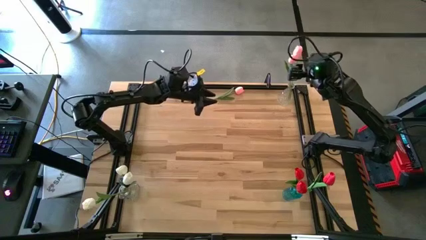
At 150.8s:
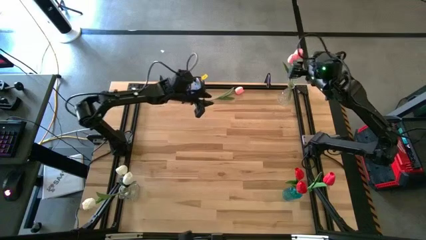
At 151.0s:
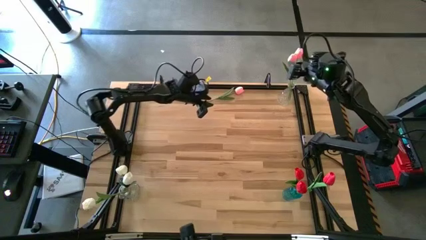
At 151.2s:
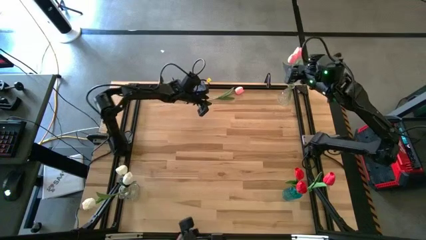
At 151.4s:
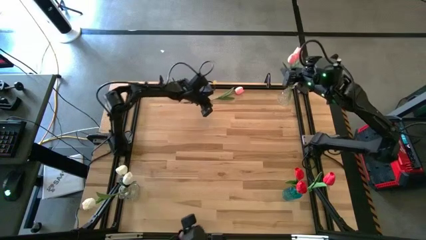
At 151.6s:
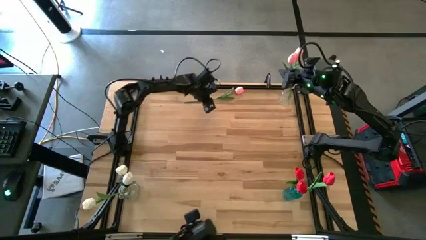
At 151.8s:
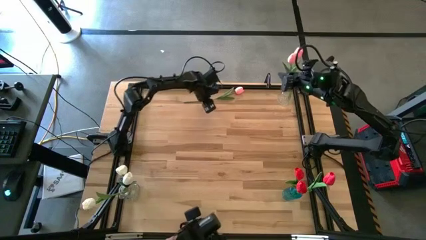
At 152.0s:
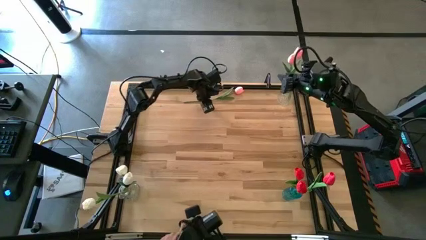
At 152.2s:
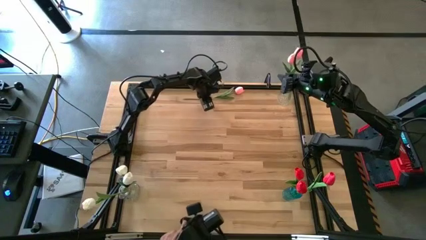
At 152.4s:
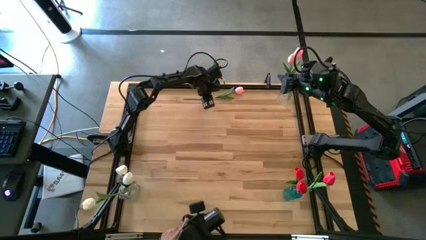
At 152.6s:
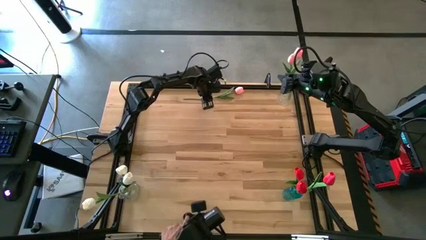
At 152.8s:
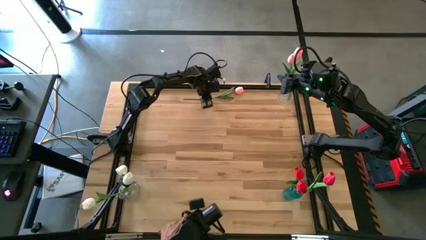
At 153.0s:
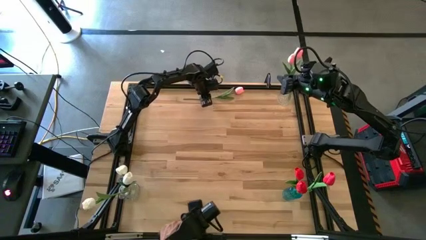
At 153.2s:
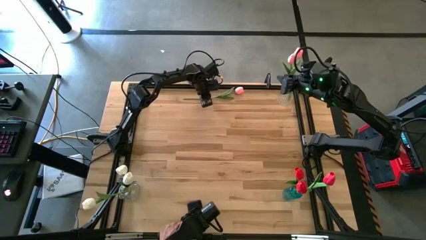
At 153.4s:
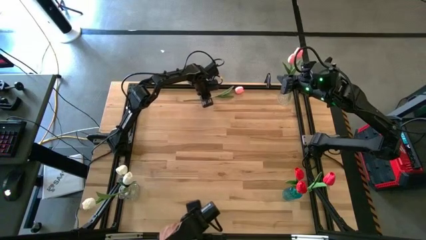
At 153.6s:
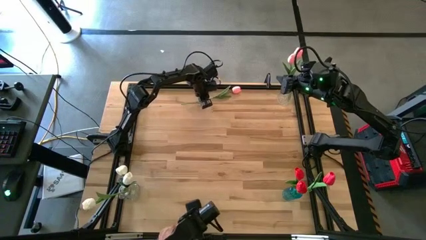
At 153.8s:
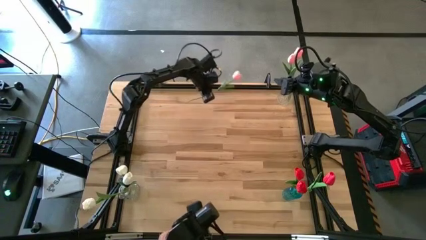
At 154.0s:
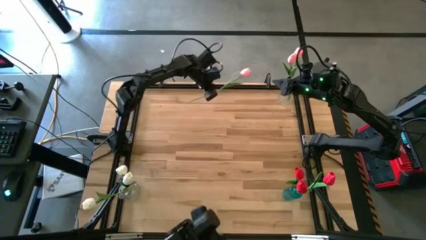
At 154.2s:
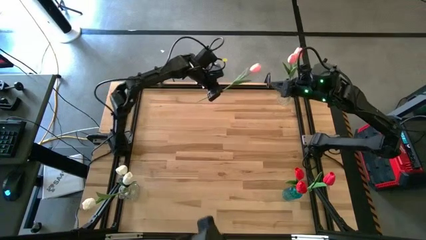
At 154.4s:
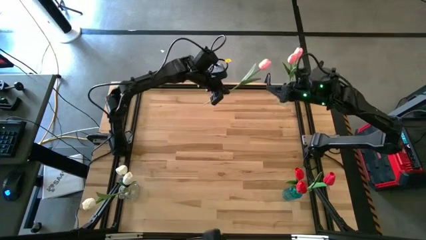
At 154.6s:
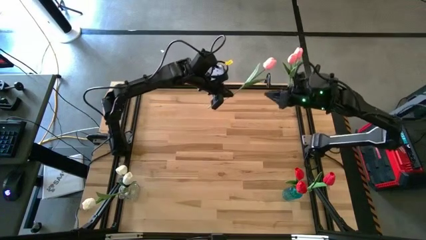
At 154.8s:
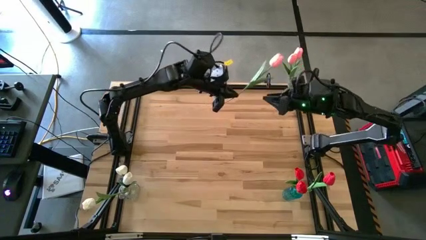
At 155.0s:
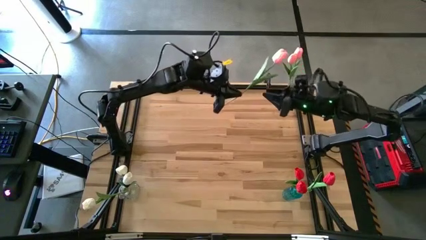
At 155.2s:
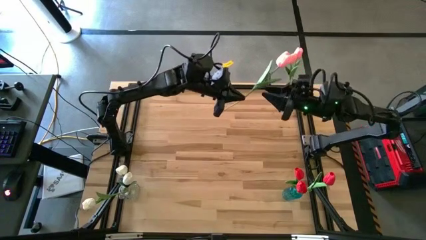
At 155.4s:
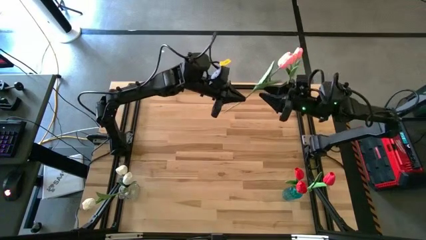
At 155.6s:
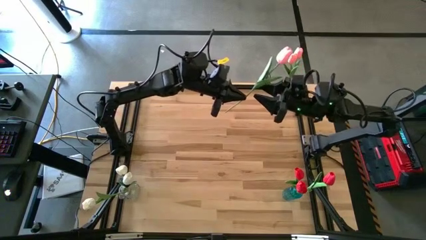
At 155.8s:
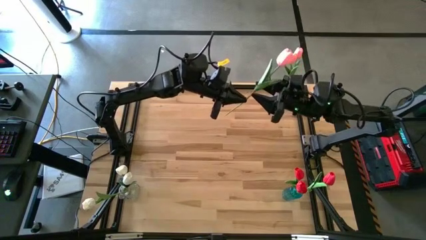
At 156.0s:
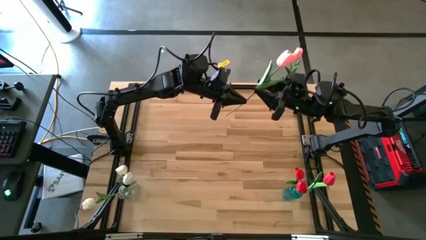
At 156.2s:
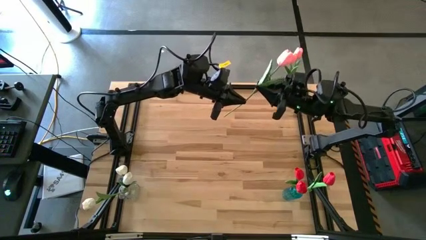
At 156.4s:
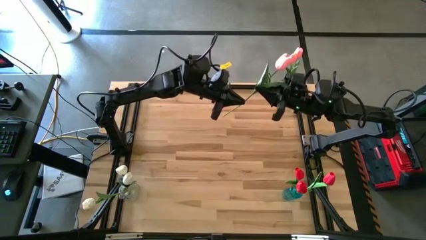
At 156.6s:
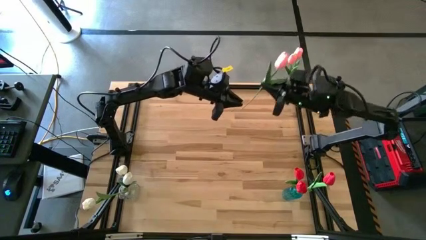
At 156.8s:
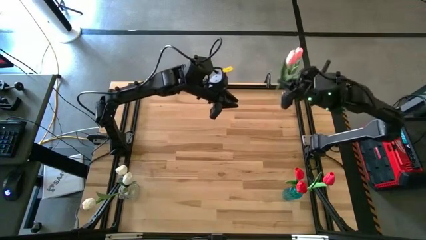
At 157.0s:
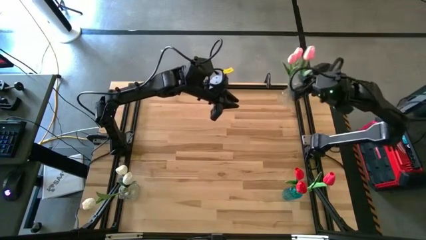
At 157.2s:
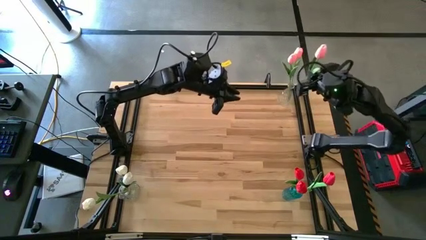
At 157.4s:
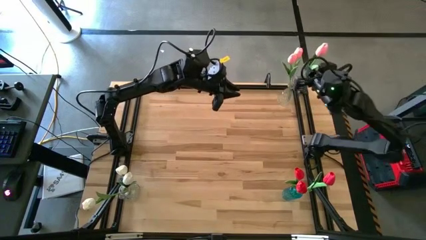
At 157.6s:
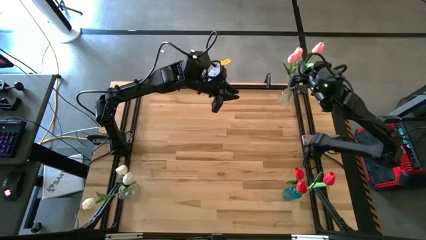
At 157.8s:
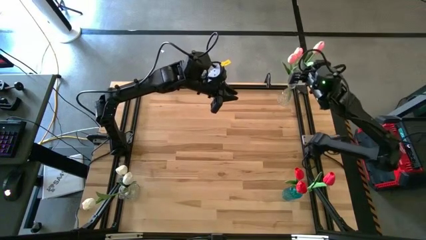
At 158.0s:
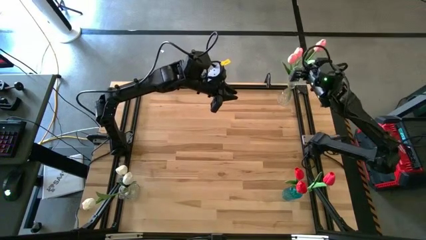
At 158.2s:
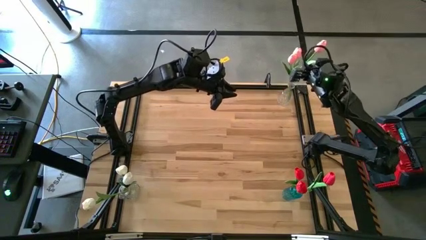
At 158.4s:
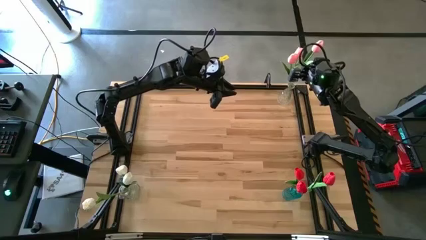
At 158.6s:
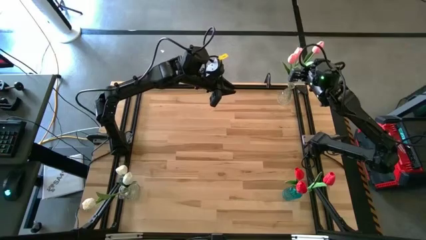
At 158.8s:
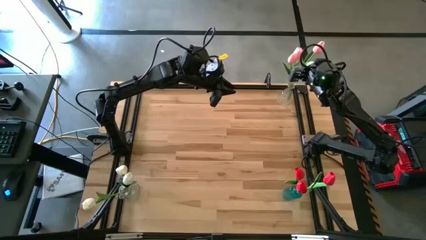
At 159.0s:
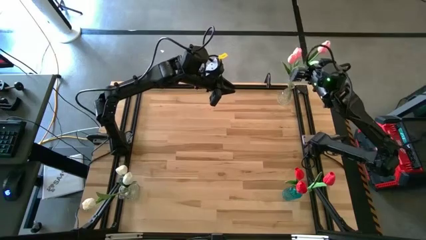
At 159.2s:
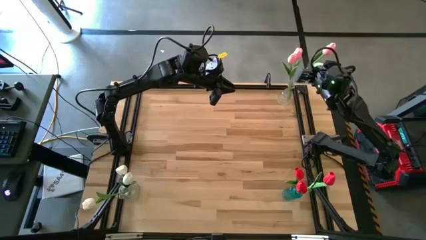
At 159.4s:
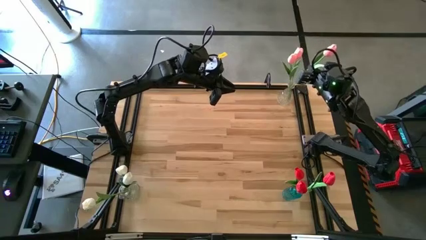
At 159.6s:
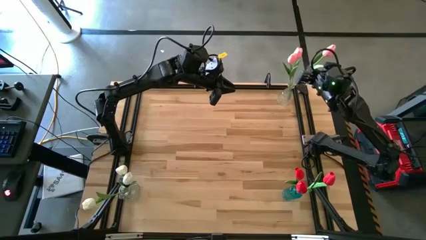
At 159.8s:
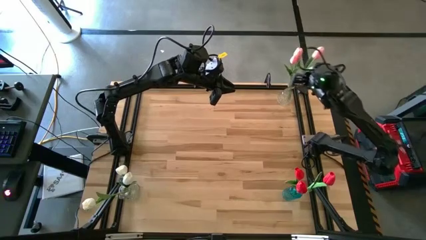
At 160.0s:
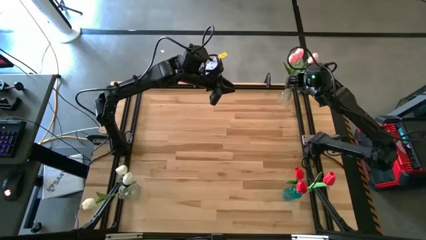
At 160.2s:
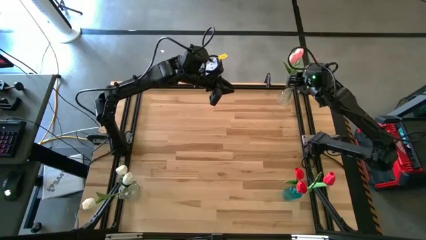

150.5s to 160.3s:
Task: Sort flowers into vase by color
Put the pink flower into the top transparent vase

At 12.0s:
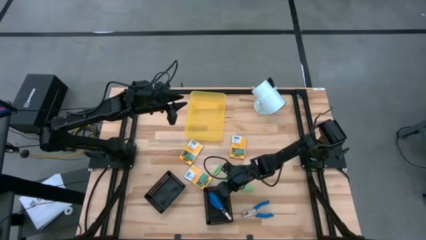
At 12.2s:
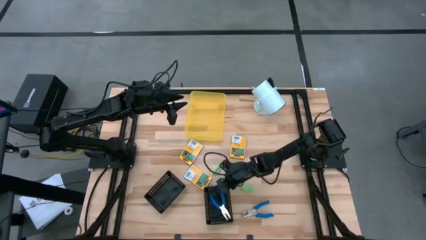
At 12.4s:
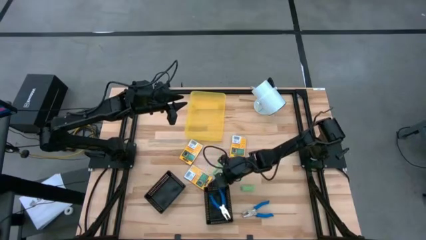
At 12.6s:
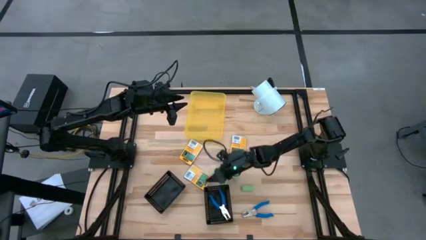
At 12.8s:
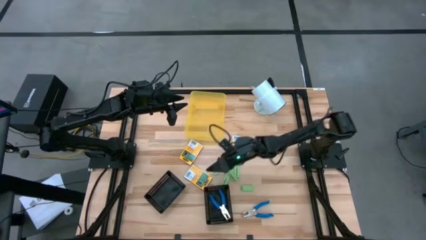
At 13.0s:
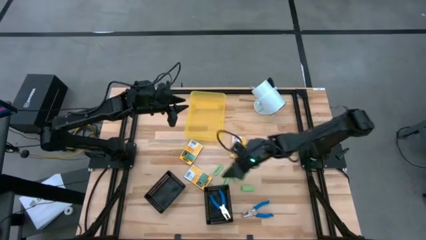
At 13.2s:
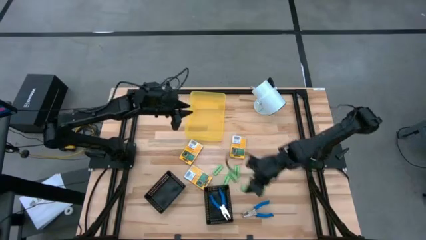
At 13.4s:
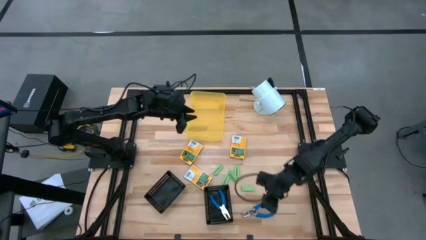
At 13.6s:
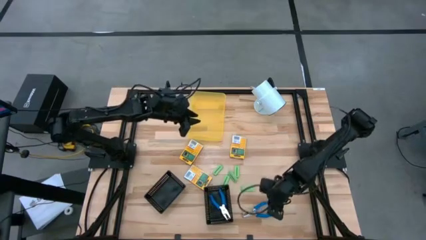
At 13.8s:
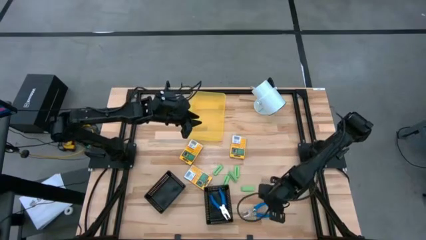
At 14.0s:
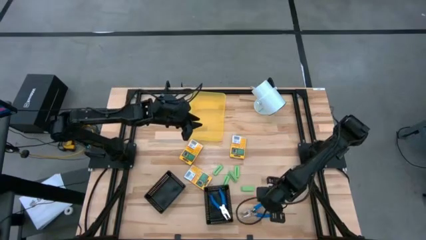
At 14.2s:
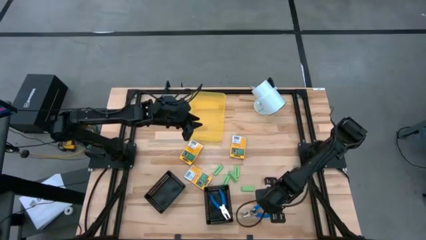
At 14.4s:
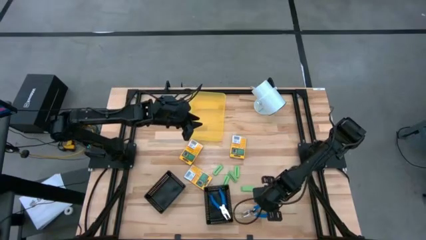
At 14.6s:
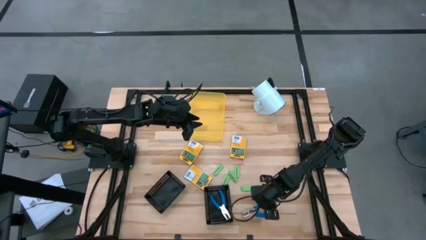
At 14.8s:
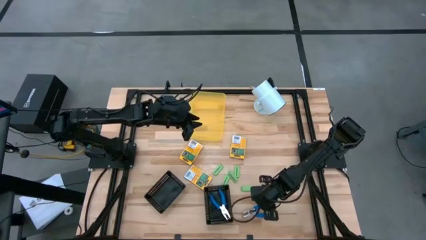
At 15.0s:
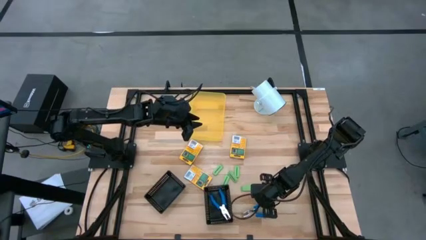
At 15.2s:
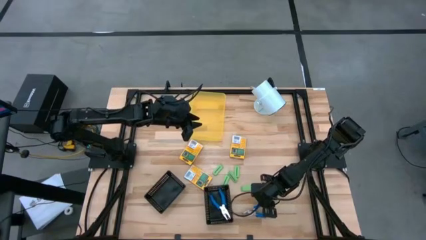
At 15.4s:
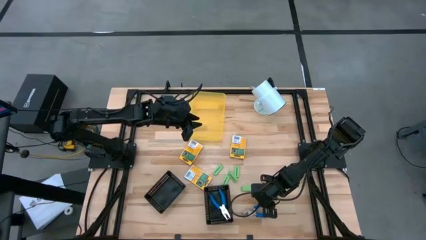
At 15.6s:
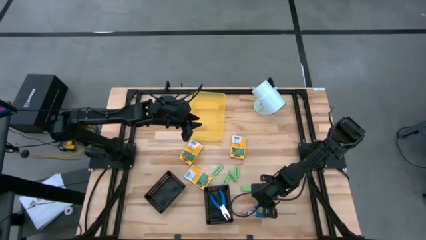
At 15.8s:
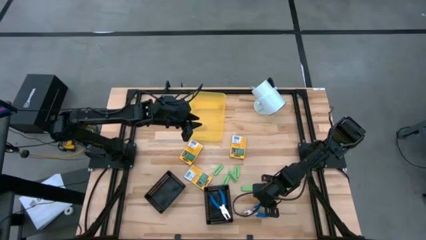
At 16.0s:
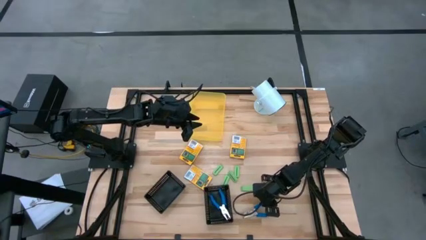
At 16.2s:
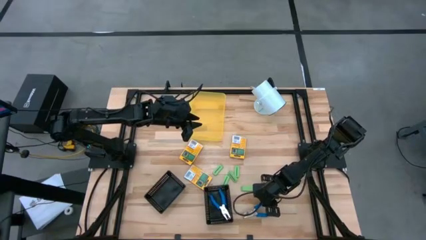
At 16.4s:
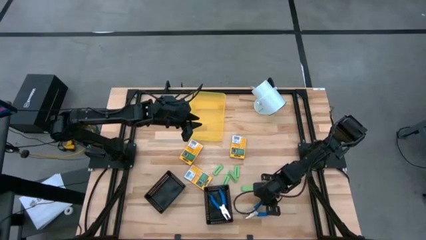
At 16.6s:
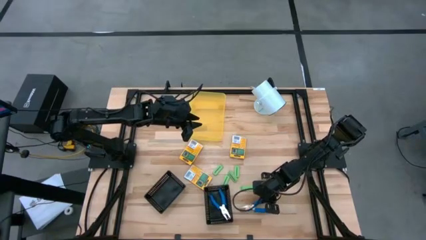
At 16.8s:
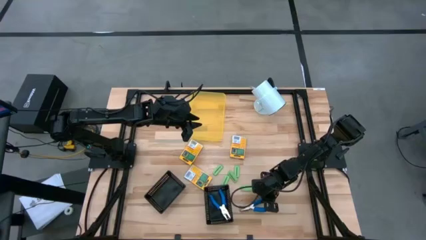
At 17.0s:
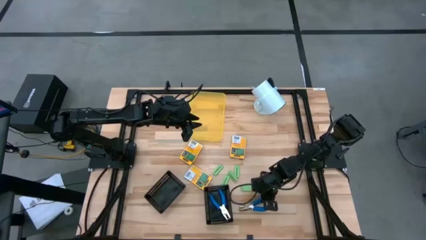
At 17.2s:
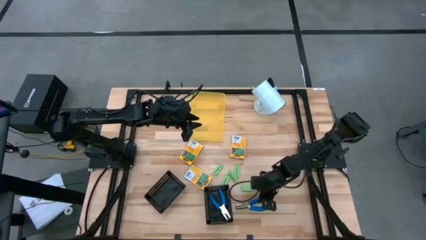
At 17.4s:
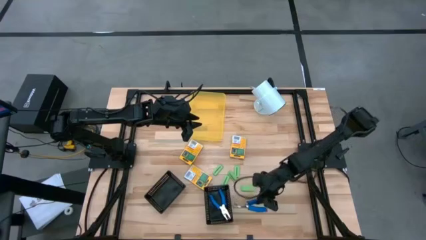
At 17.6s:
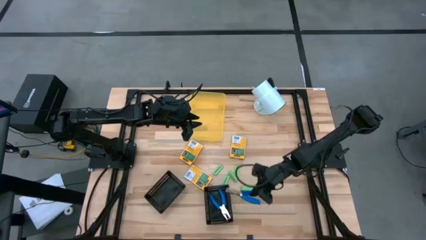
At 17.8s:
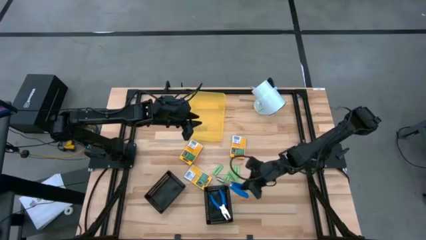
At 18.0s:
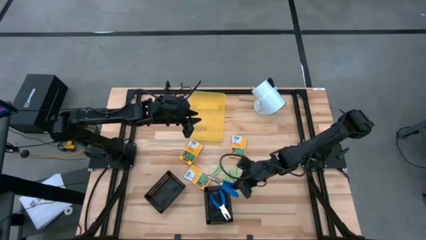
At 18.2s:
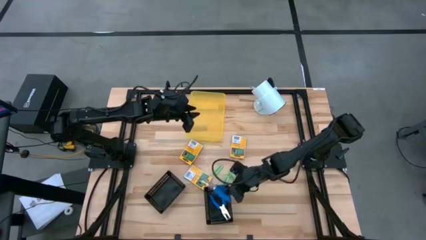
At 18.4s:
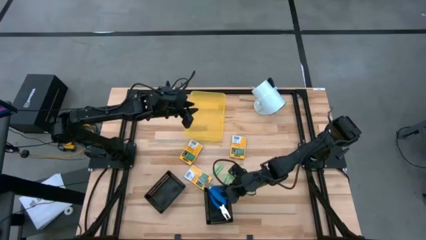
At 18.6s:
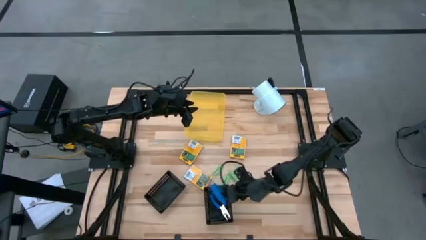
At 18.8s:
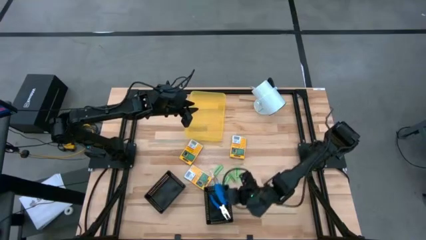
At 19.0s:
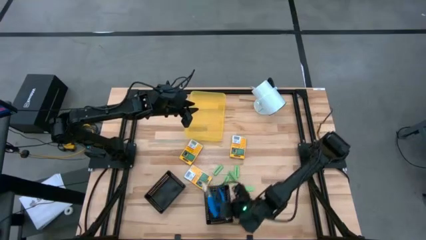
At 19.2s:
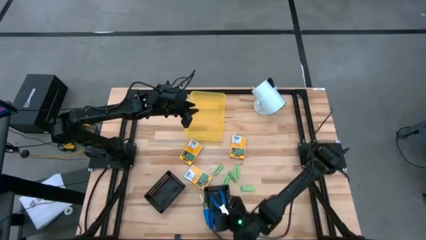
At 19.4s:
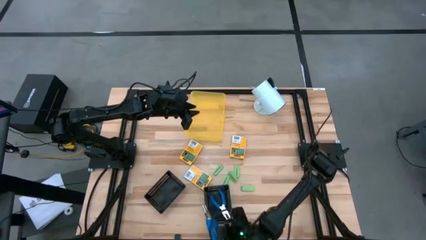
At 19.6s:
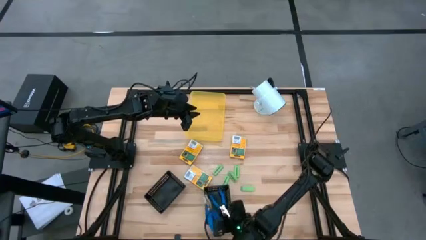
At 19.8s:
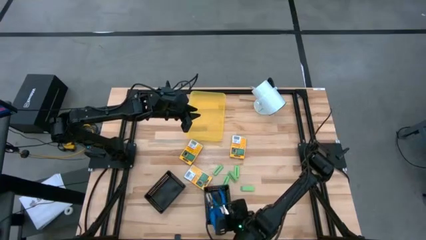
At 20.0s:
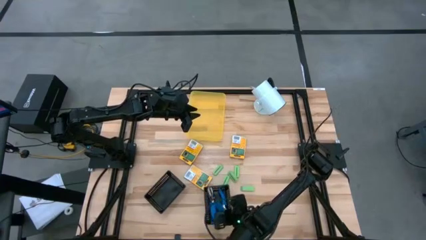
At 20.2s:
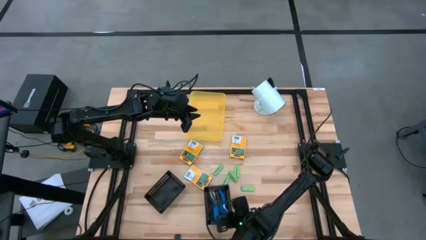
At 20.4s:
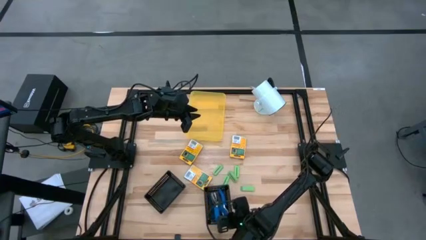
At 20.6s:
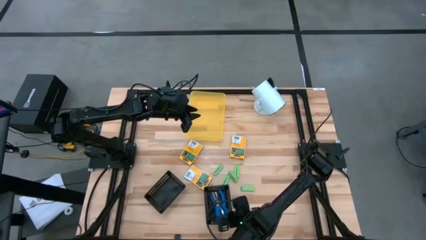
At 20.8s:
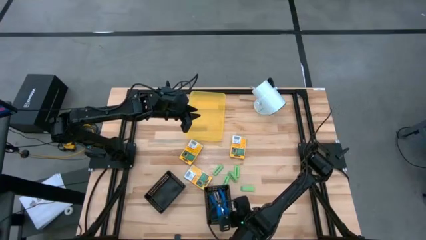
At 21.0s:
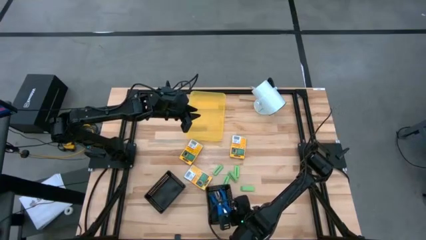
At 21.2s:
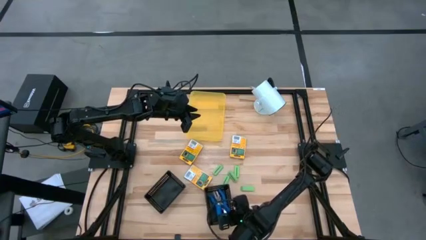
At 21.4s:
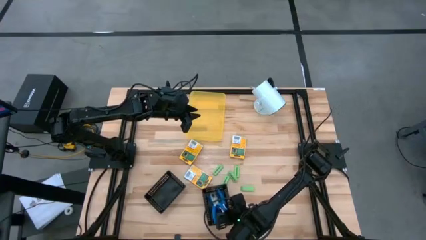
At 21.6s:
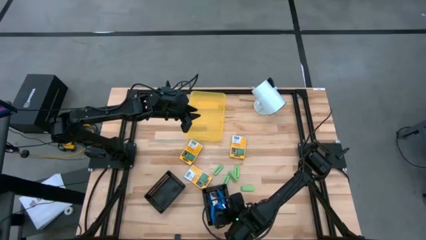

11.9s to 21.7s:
Task: Pick & Place School Supplies
Put the blue puncher into the right black bin
